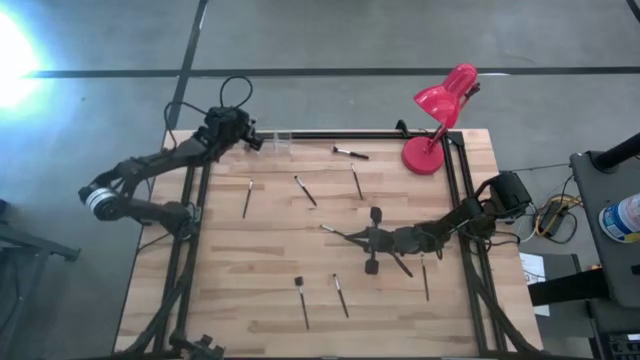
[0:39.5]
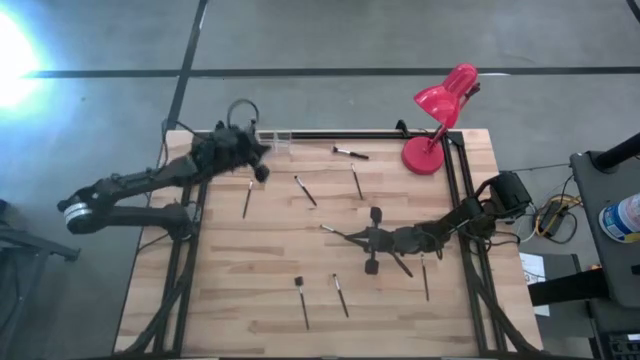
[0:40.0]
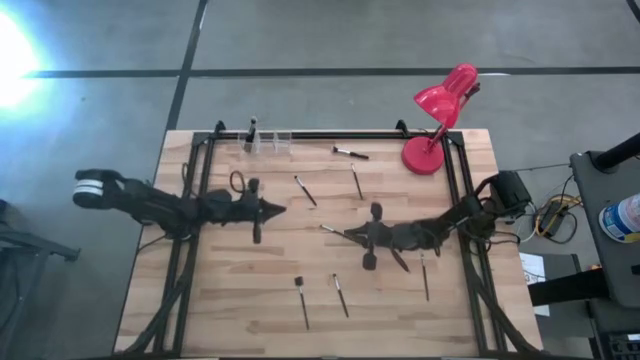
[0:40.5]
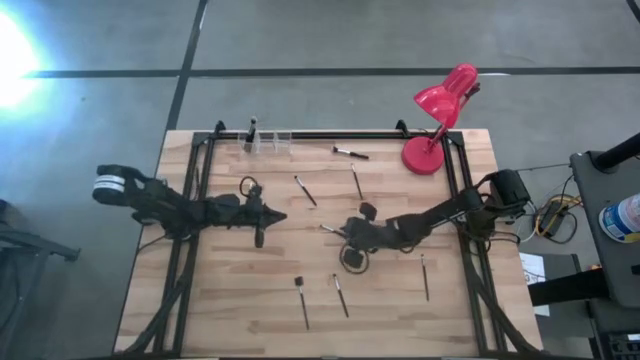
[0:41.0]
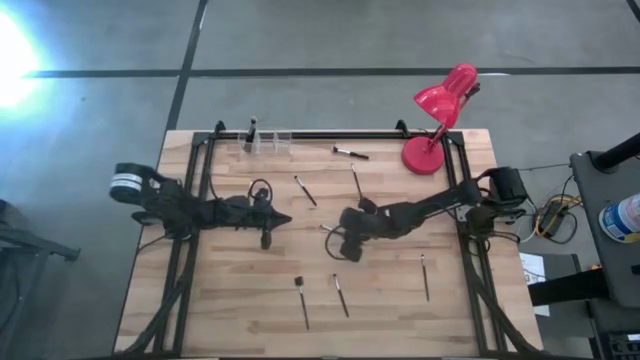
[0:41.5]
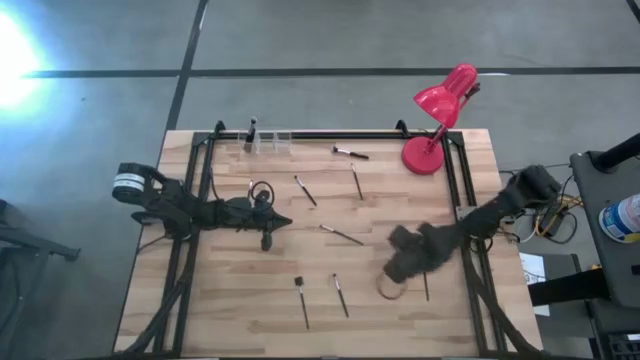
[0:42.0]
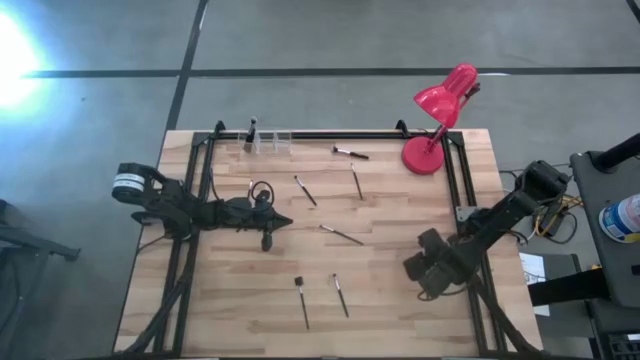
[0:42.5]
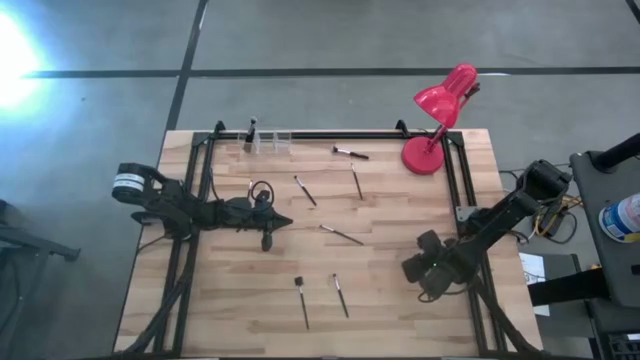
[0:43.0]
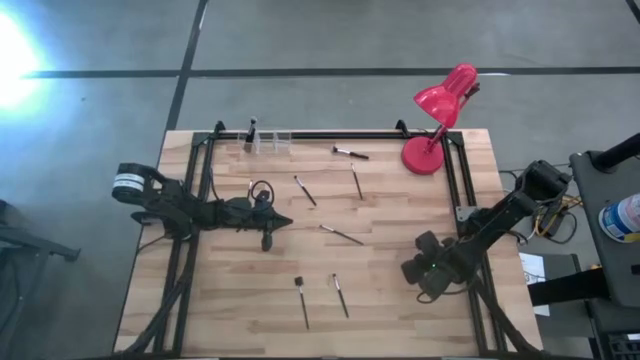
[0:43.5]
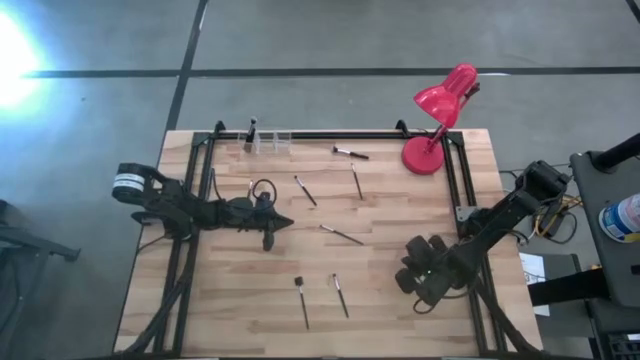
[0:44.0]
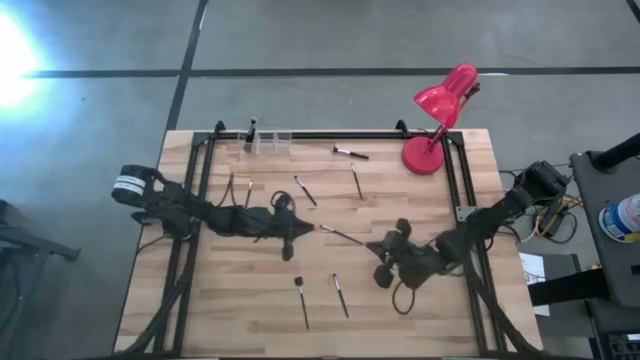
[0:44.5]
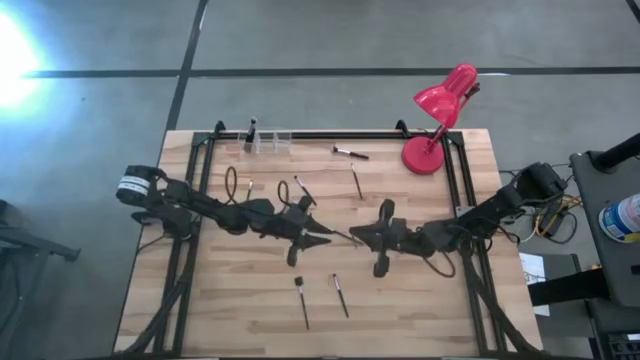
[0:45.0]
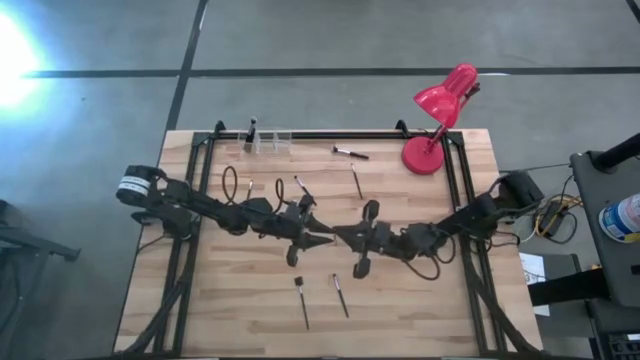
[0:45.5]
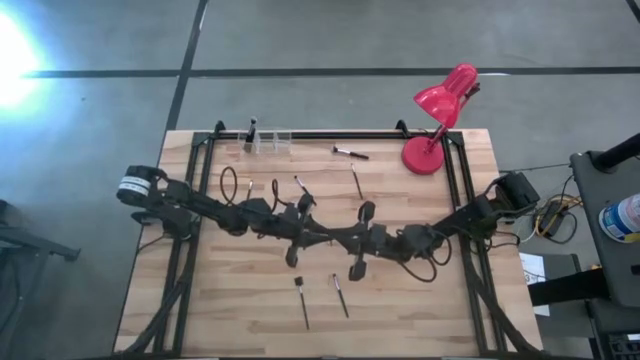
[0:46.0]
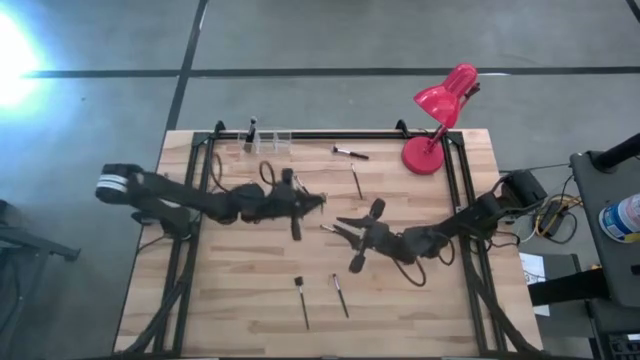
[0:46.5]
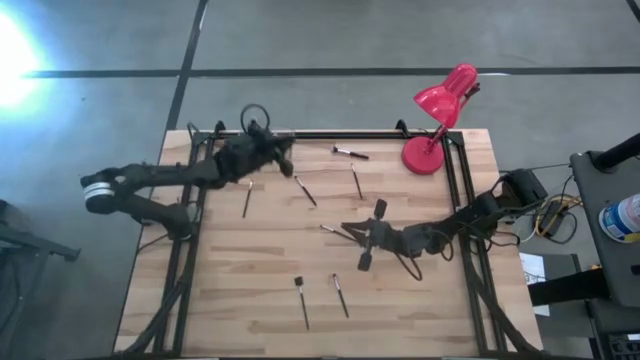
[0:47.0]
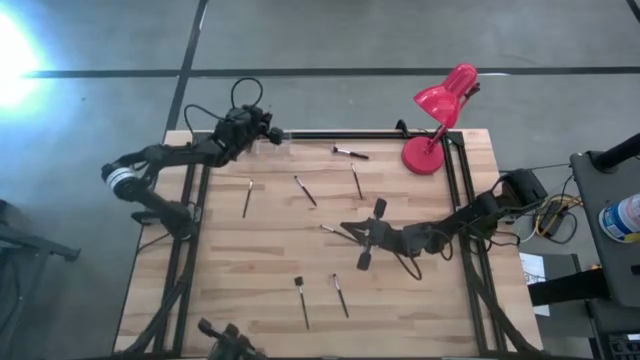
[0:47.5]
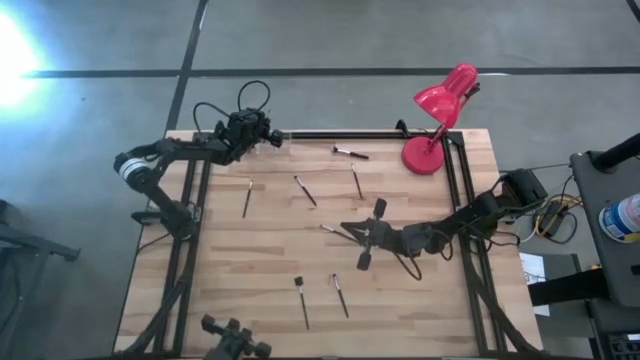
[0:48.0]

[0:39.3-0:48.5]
Task: Put items in baskets/containers
Put the black eyeshadow brush into the transparent organizer

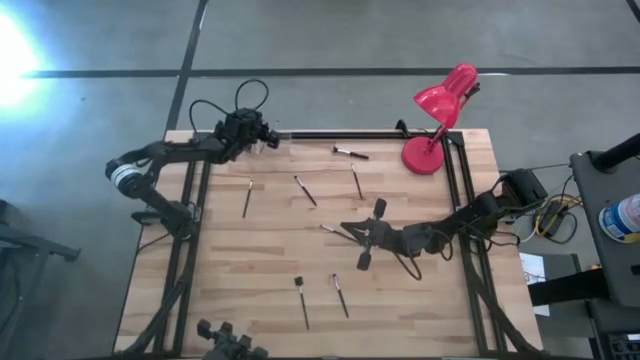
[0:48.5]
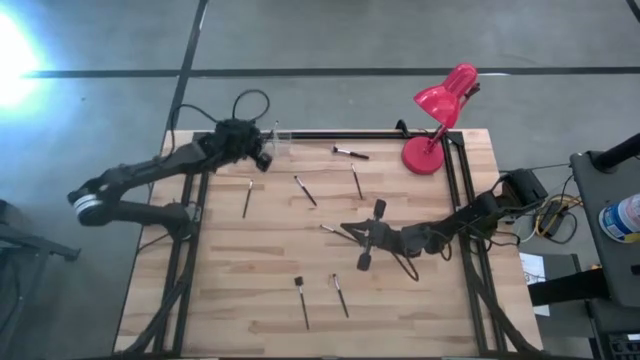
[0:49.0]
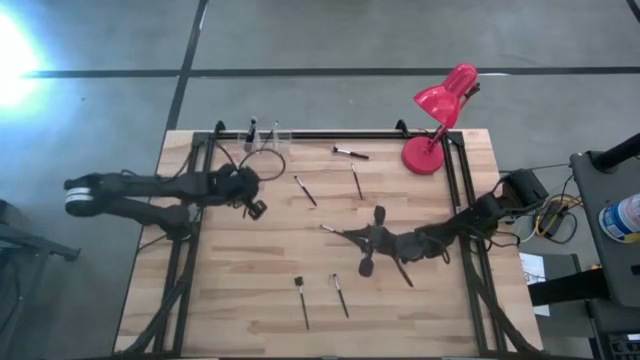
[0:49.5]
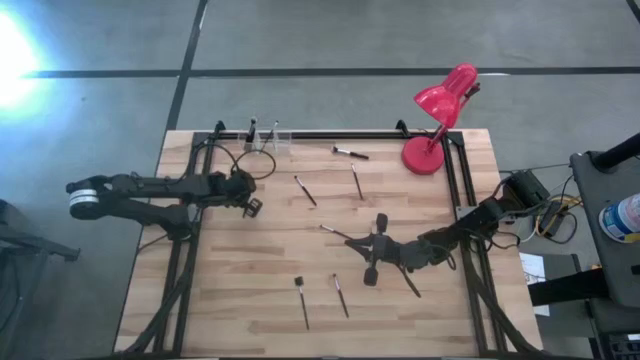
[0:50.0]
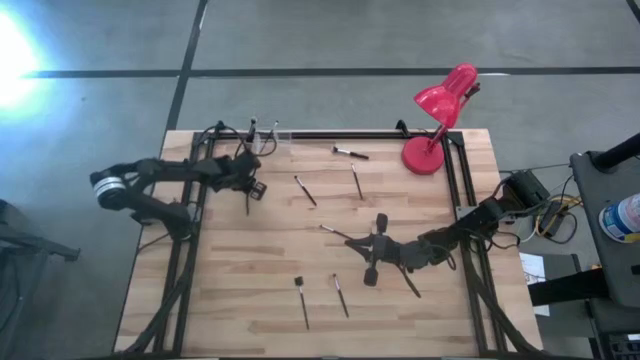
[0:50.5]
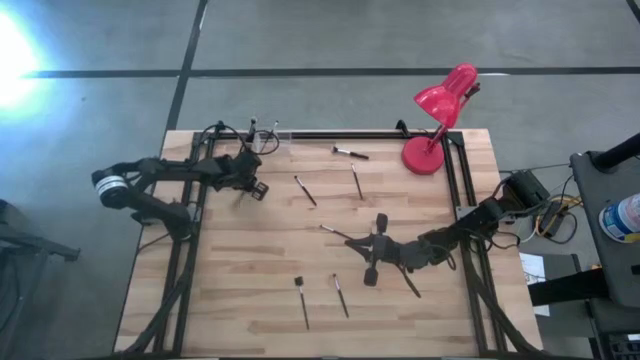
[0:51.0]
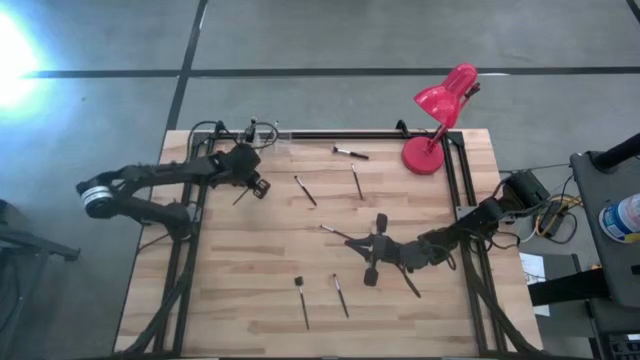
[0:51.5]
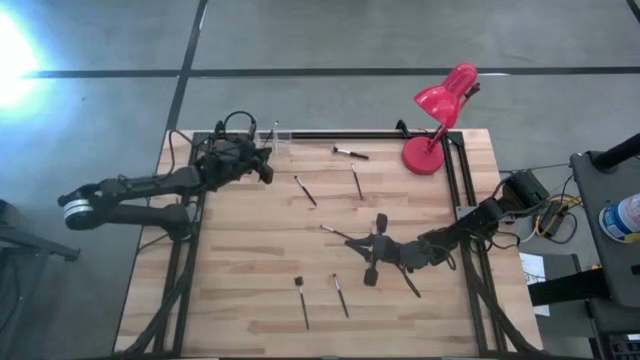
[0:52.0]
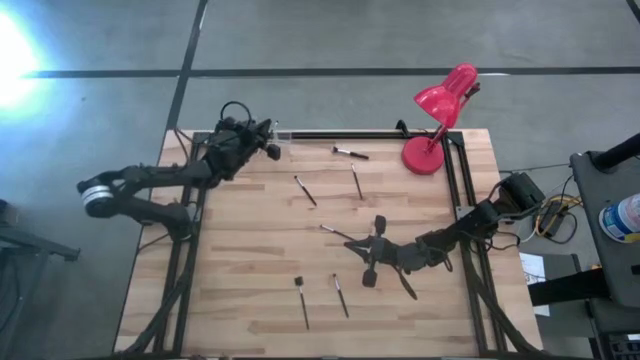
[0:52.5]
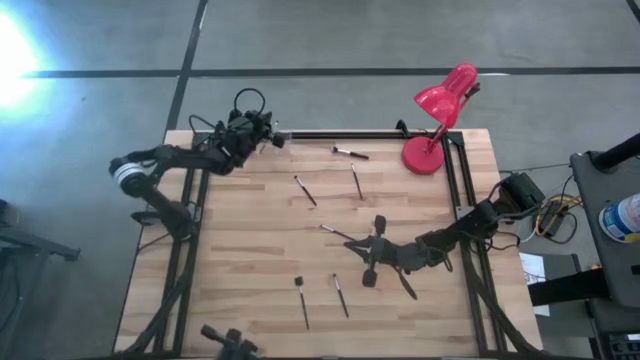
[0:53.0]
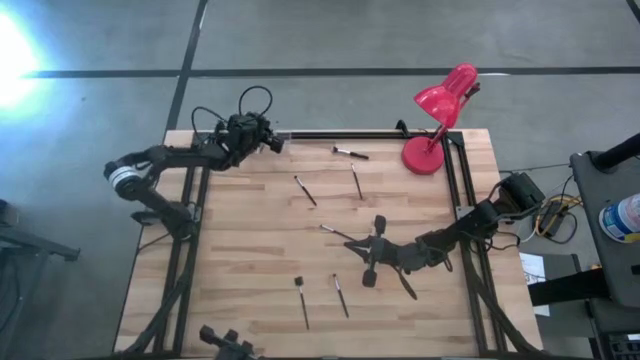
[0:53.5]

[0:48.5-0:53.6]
Put the black eyeshadow brush into the transparent organizer

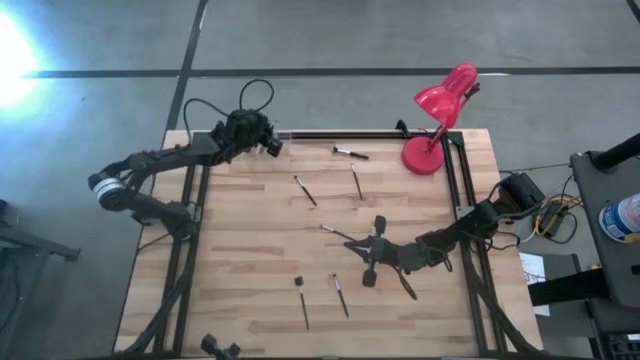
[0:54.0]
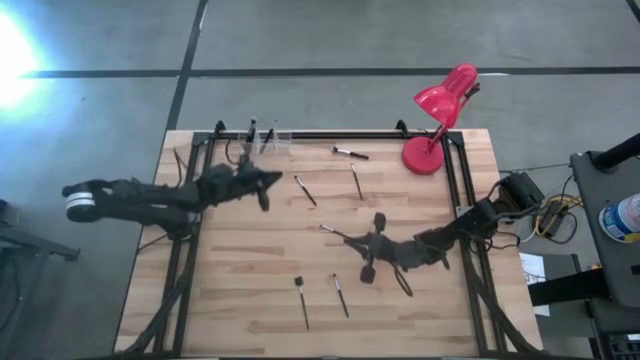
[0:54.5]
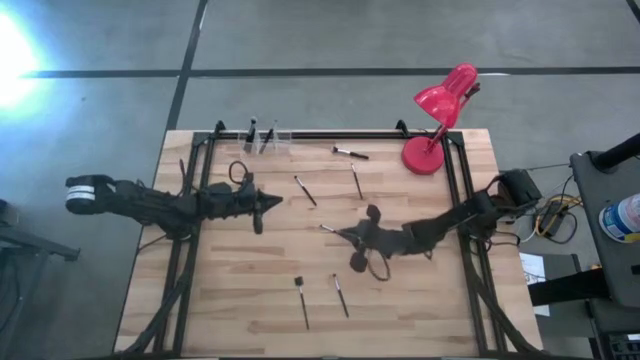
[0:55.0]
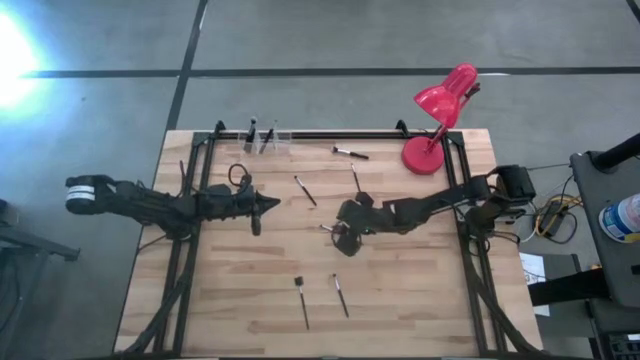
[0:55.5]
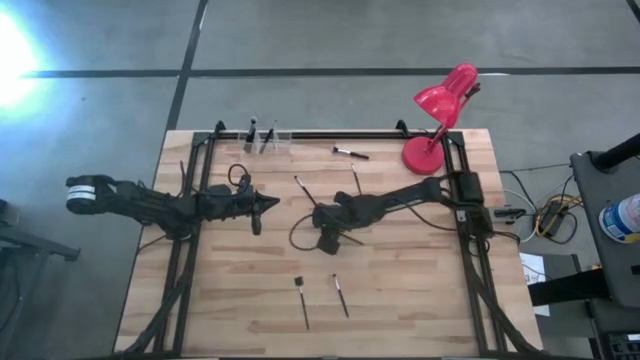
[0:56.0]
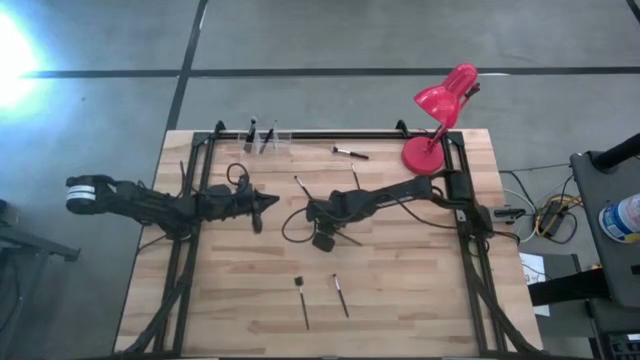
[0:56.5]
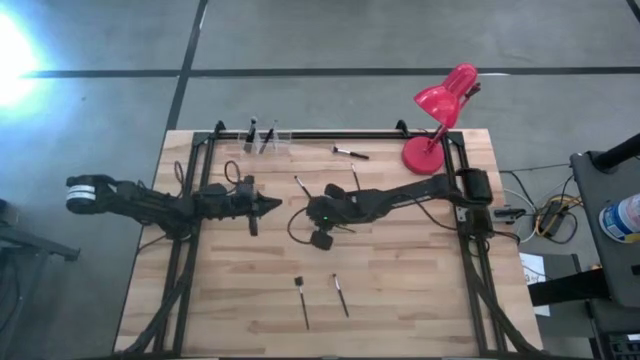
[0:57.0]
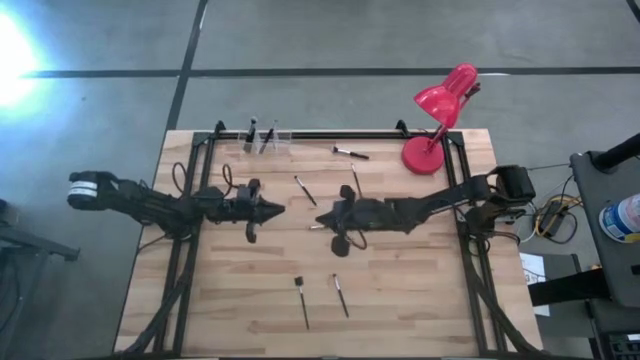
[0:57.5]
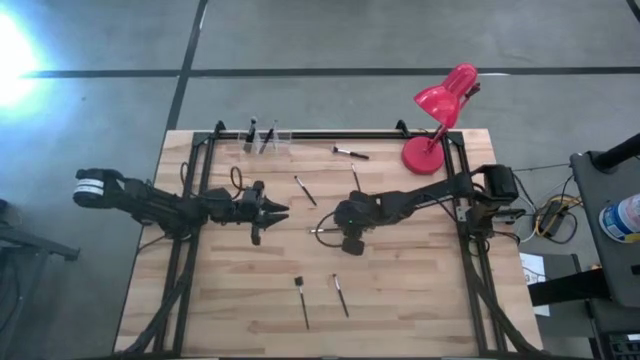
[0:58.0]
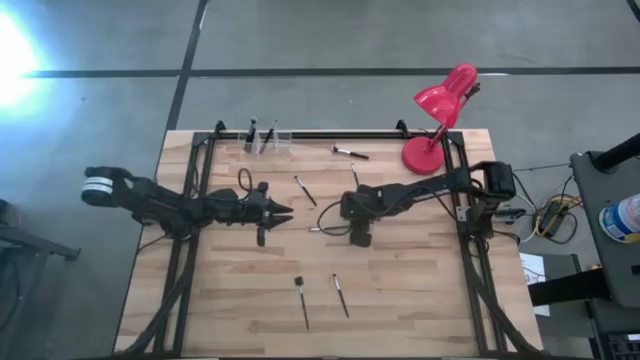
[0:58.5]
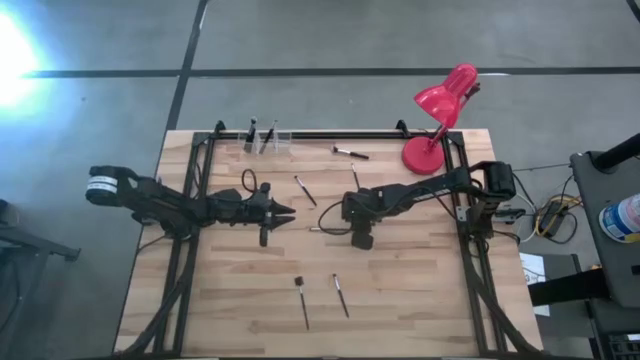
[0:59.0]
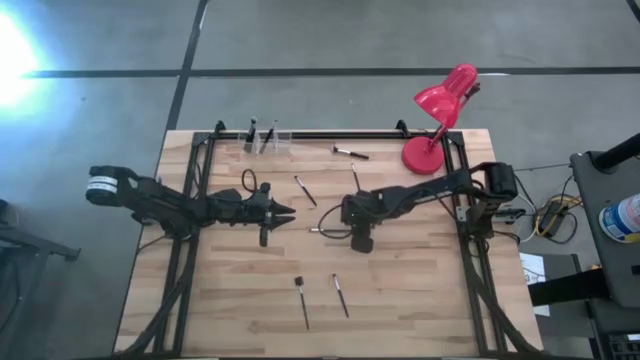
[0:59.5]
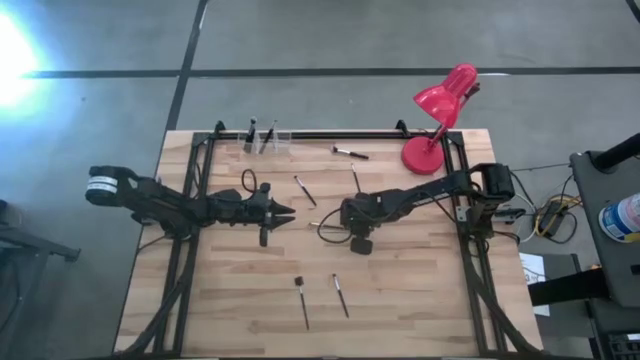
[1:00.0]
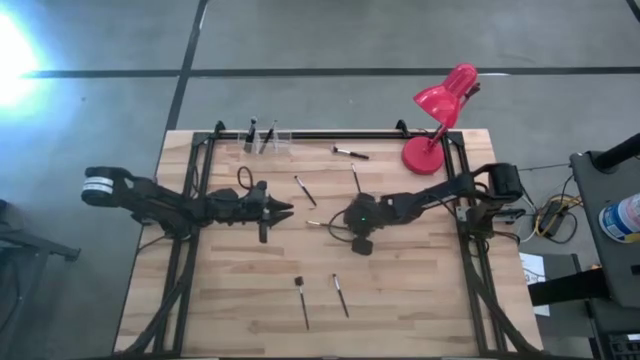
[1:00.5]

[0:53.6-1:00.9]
Put the black eyeshadow brush into the transparent organizer
